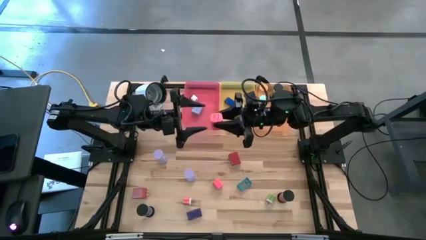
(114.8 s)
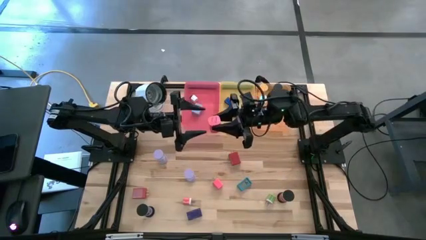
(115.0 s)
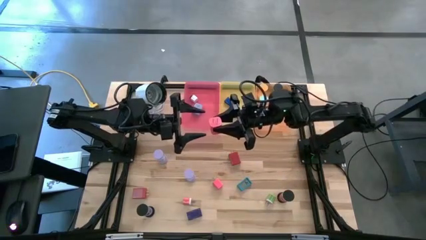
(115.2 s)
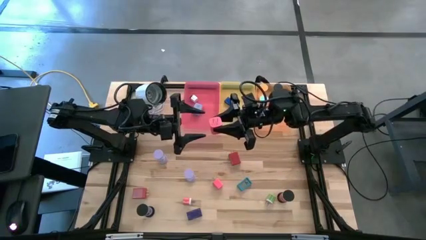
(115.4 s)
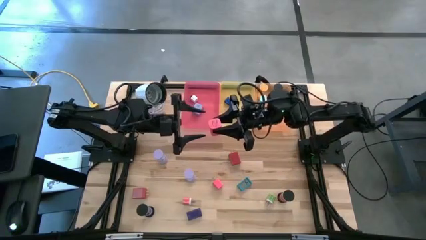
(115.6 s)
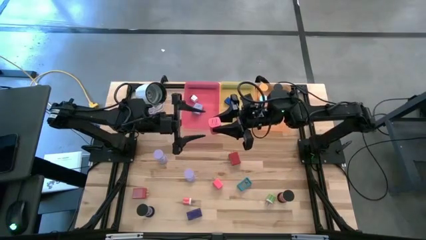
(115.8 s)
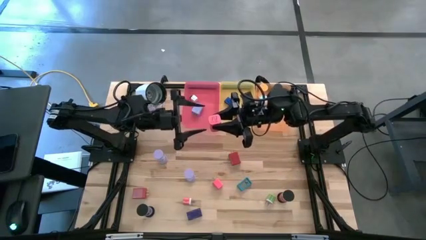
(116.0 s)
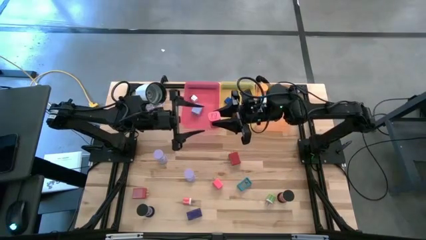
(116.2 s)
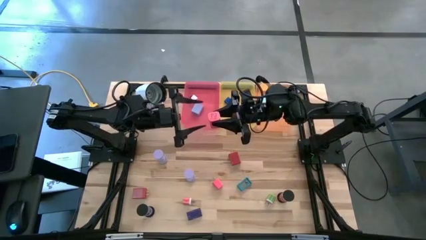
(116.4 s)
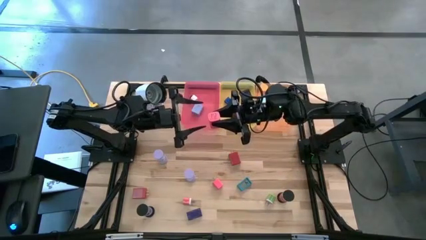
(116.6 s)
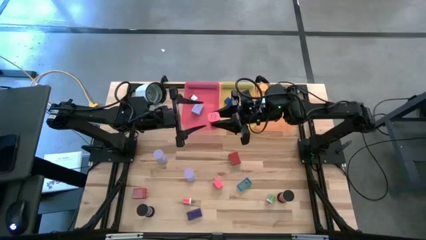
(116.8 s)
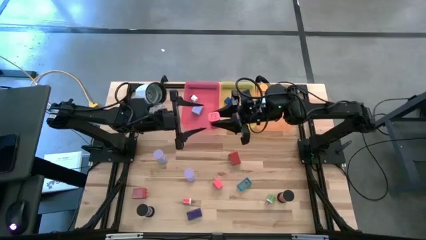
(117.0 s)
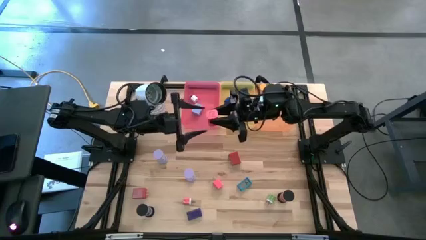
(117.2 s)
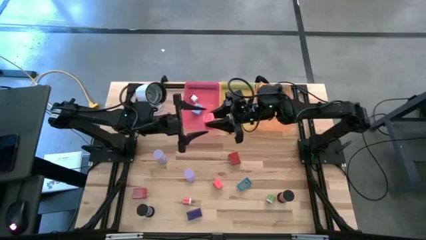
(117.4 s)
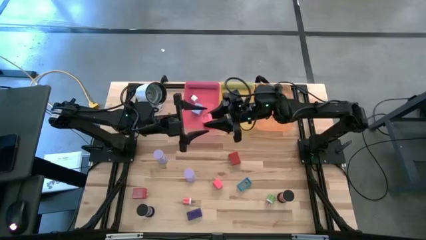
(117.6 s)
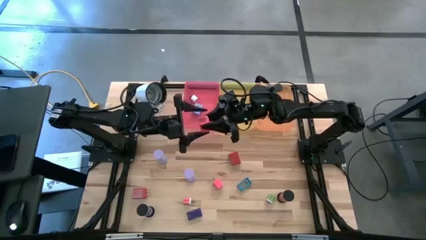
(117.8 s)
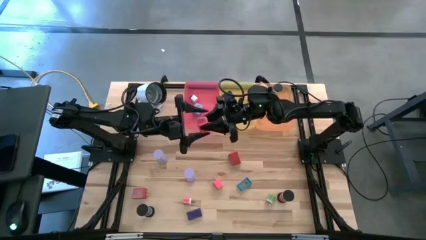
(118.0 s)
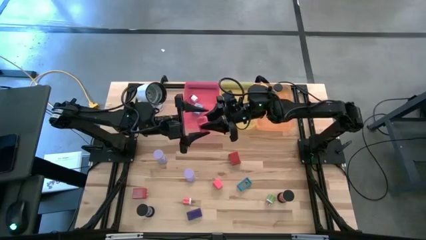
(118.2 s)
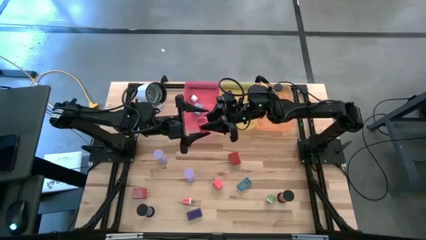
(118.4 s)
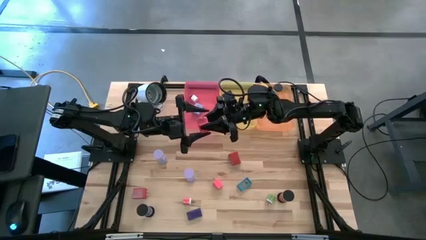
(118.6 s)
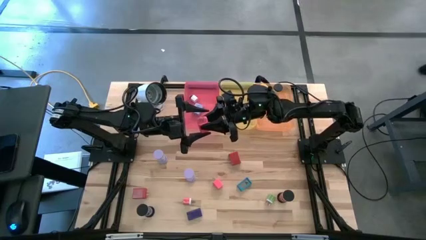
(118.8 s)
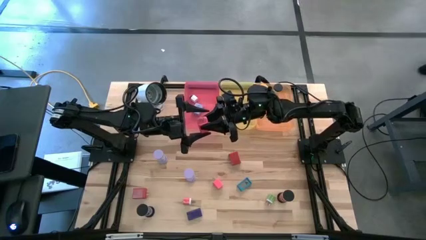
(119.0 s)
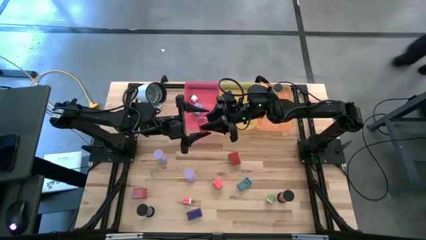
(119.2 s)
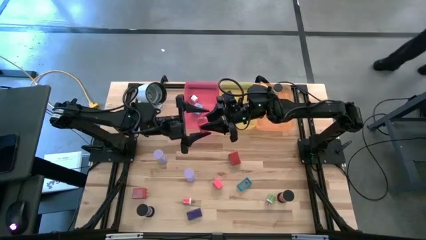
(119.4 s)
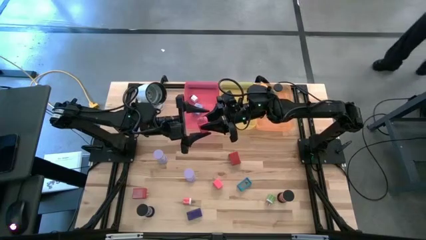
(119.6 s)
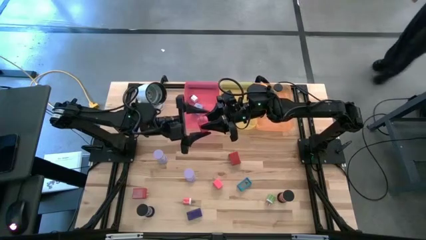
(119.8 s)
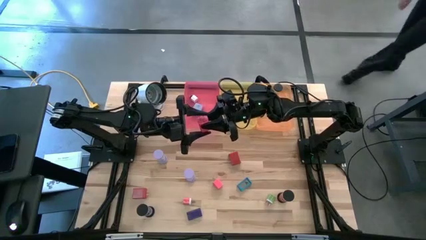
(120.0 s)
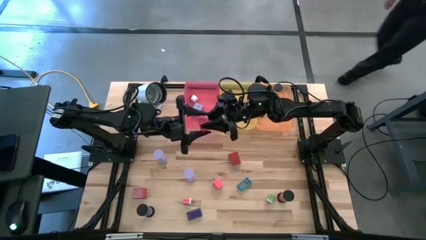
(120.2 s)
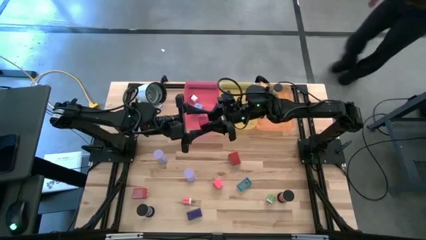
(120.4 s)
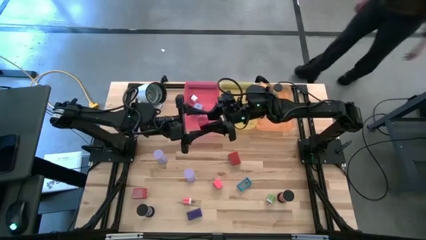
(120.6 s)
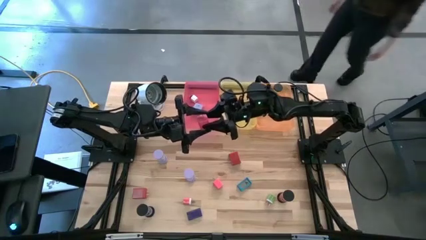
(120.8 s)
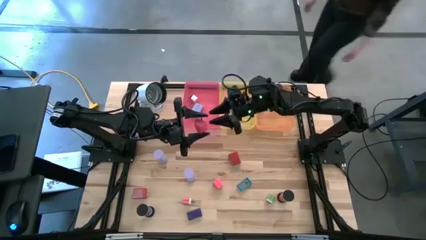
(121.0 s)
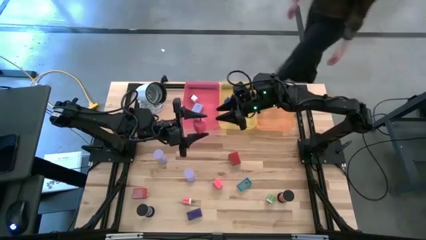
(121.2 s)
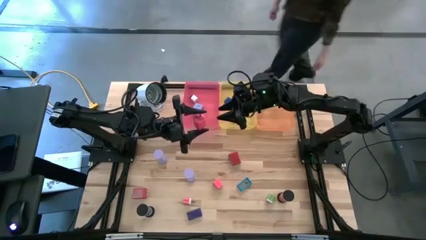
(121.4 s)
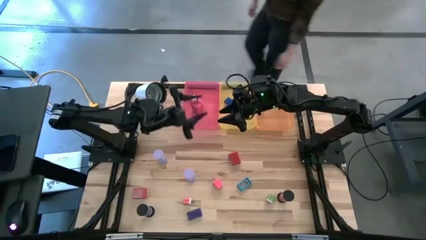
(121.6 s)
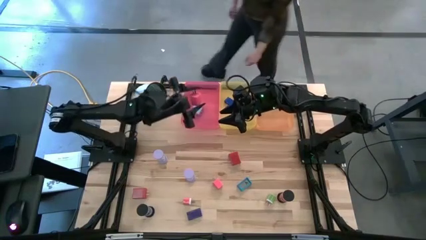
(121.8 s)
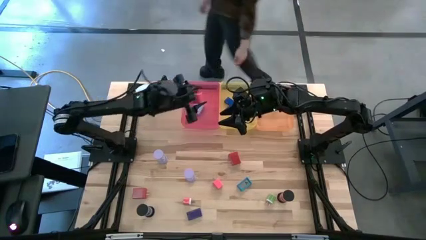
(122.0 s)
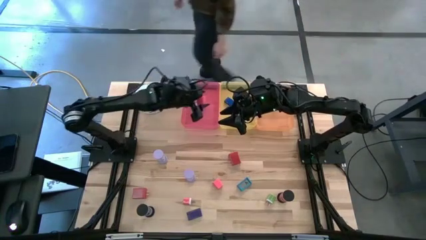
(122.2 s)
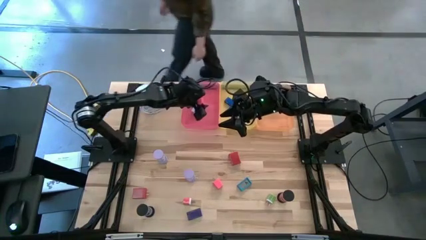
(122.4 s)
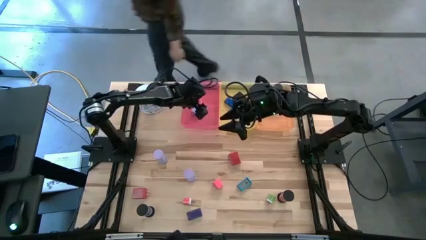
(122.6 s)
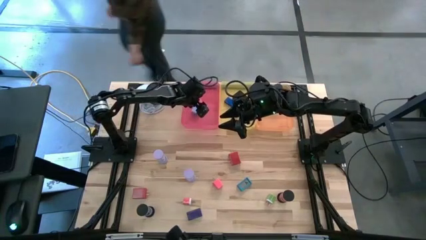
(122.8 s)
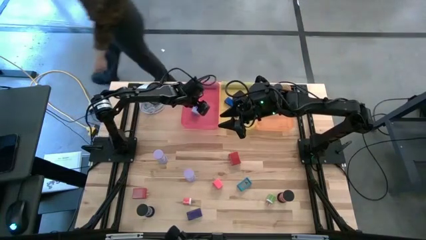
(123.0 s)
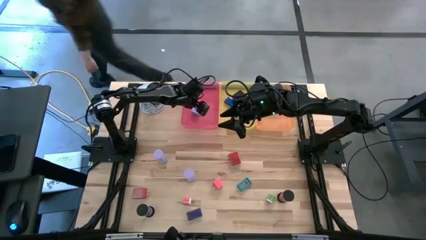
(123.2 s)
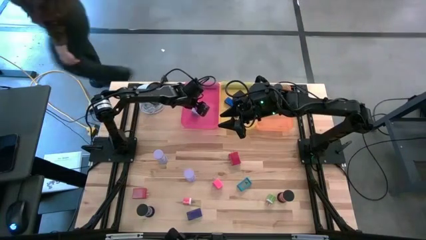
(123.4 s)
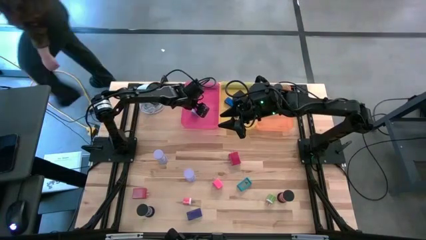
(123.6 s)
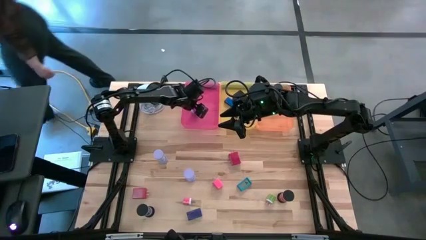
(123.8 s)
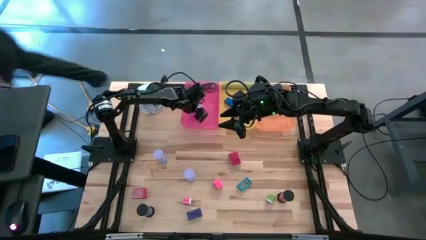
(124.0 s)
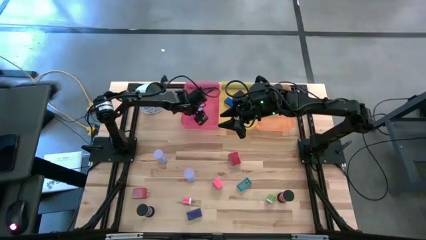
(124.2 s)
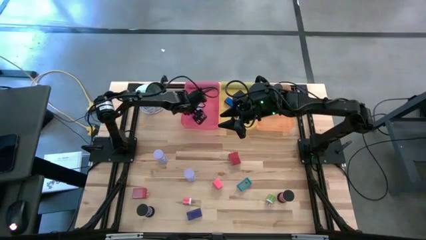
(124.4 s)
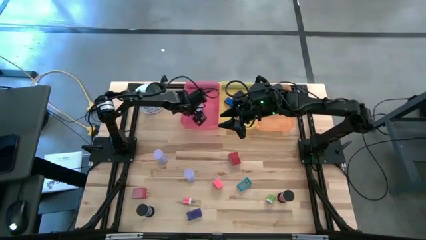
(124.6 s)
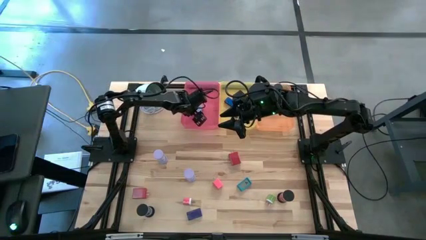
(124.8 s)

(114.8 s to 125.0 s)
Task: Pick & Place Office items
Put the right pink charger adapter into the red bin

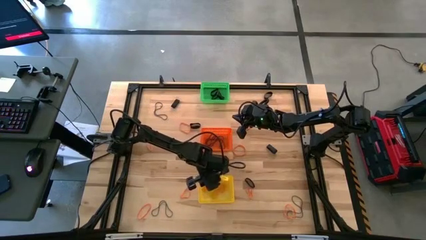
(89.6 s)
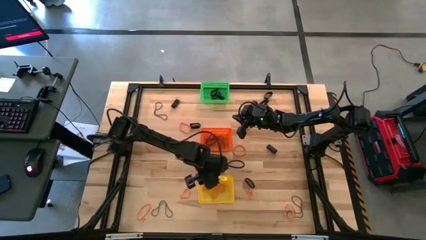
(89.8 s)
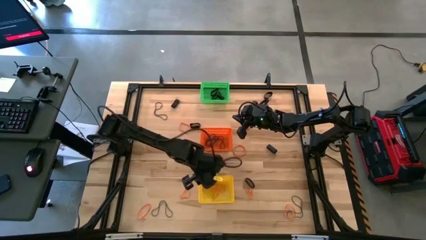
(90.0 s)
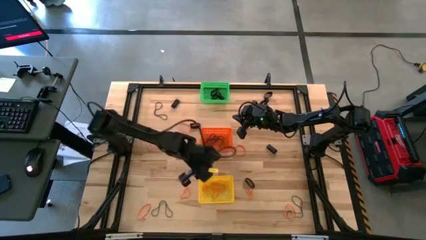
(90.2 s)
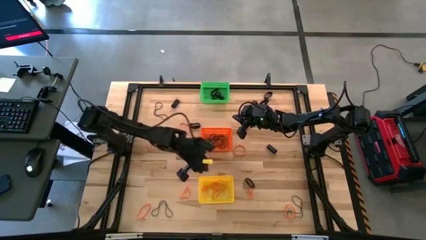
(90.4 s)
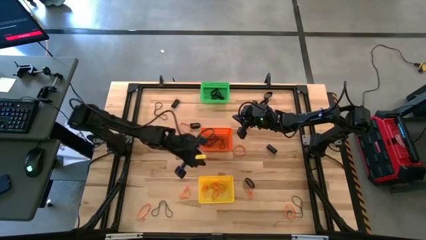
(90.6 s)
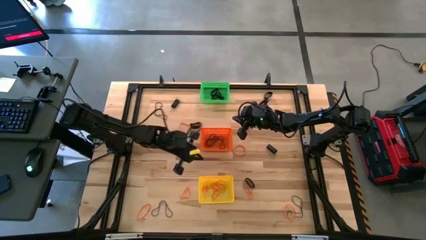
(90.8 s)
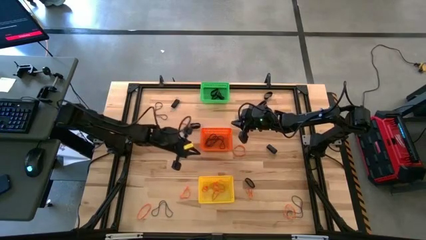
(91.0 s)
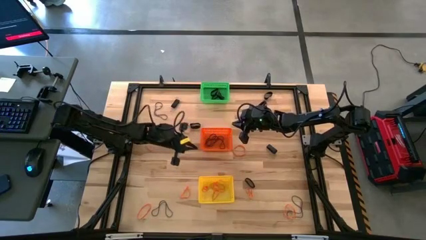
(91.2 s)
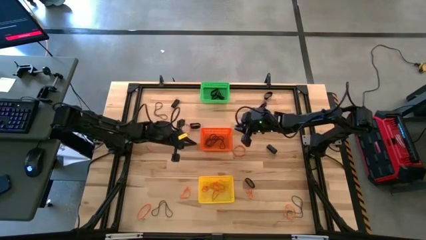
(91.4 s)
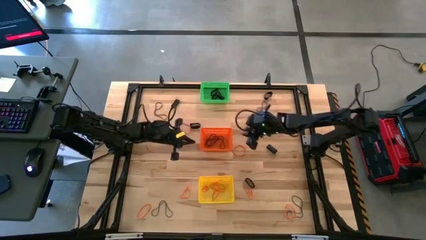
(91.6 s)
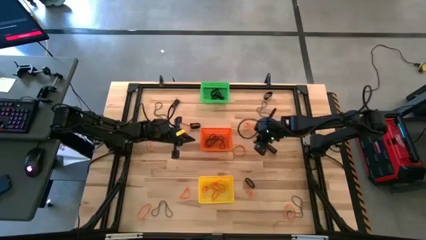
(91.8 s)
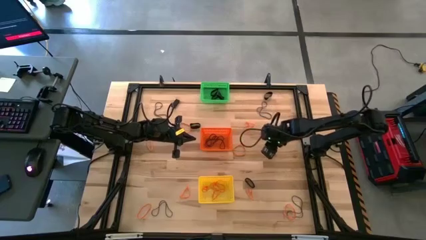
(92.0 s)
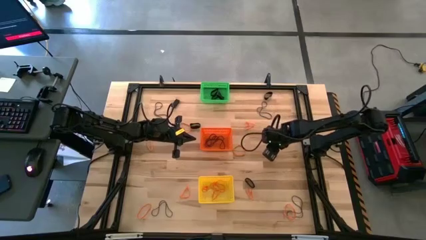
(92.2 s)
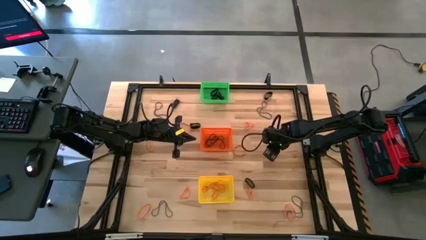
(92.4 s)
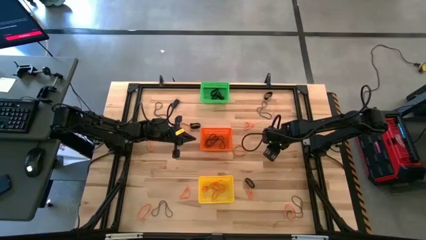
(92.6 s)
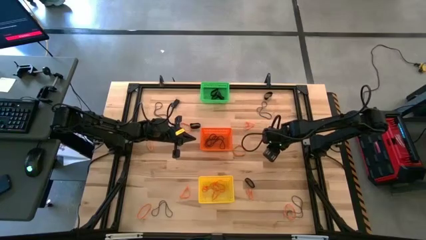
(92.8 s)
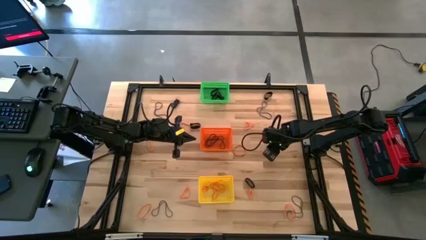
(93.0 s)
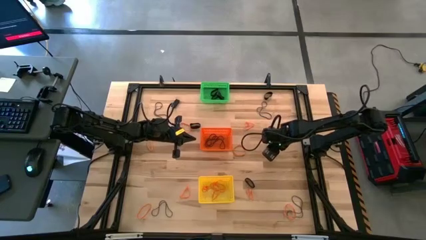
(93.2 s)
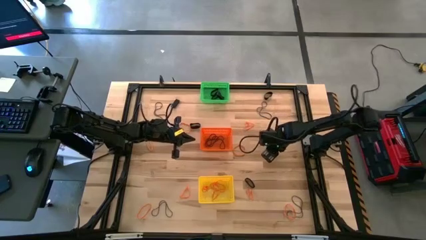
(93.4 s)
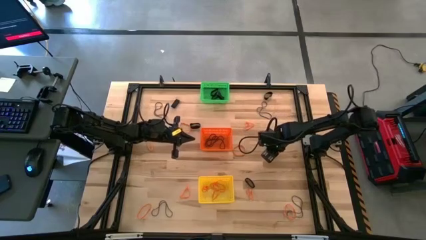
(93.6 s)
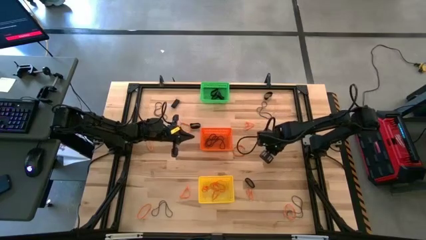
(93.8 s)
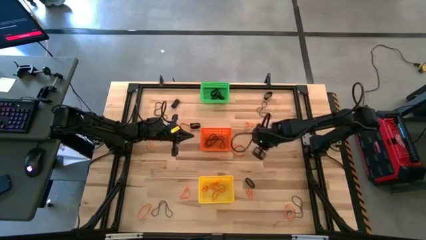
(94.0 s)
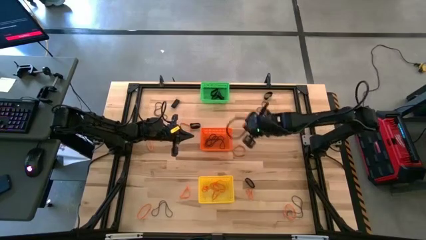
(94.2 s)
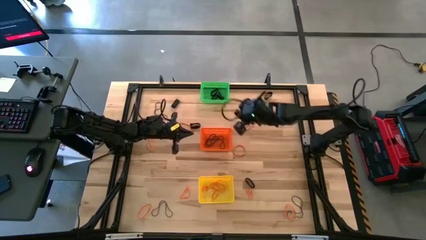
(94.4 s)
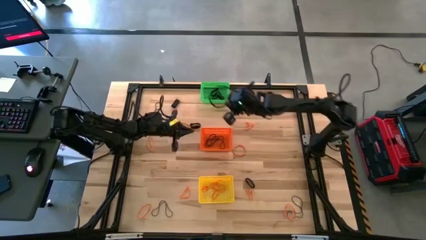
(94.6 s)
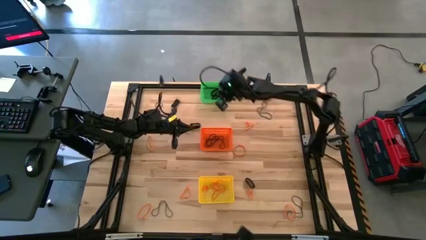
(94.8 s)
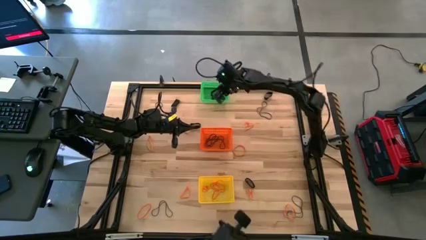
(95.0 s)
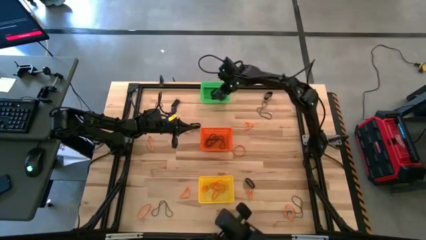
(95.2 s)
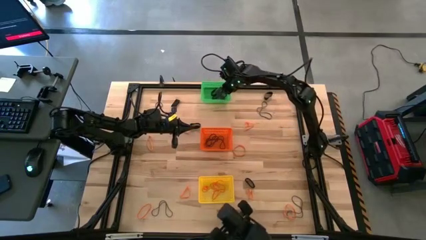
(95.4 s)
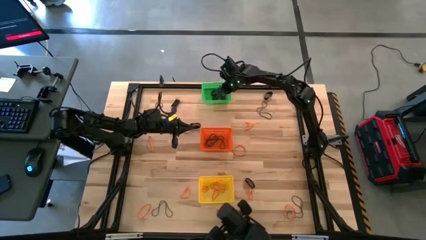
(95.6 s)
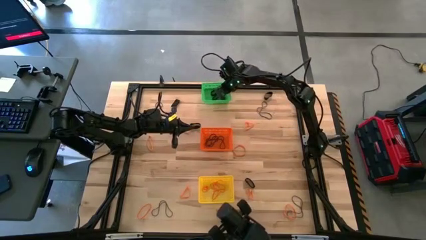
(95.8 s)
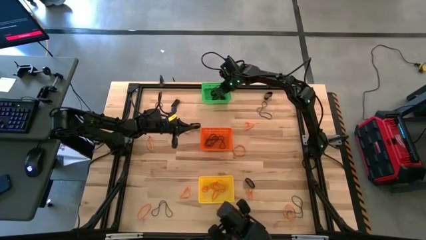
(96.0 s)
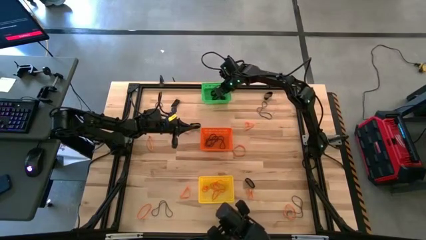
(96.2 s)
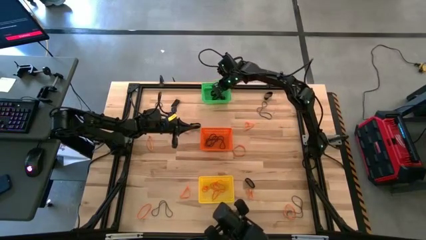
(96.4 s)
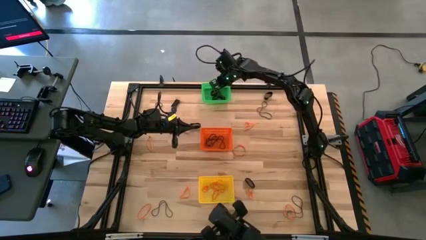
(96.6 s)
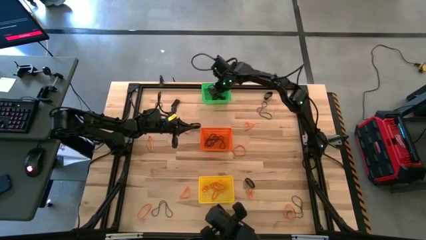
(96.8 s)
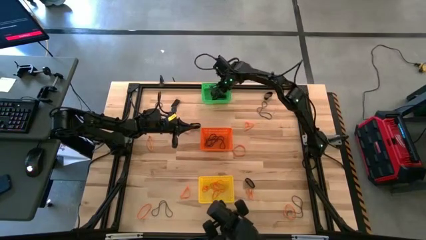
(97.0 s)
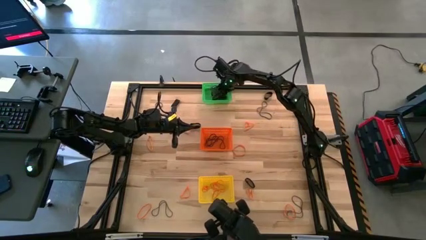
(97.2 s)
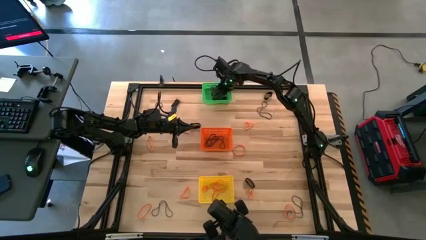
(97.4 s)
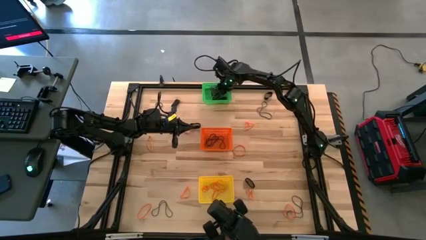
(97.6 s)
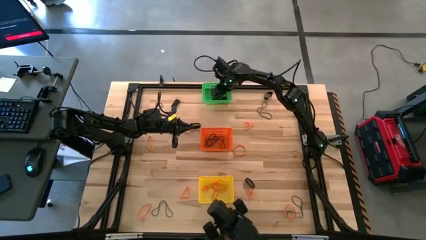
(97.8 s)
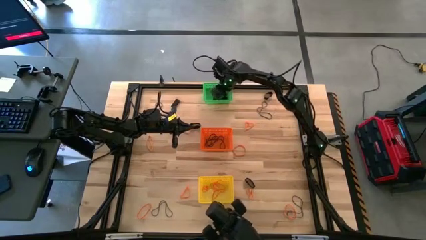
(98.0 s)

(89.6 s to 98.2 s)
Task: Sort rubber bands into baskets
Put the black rubber band into the green bin
